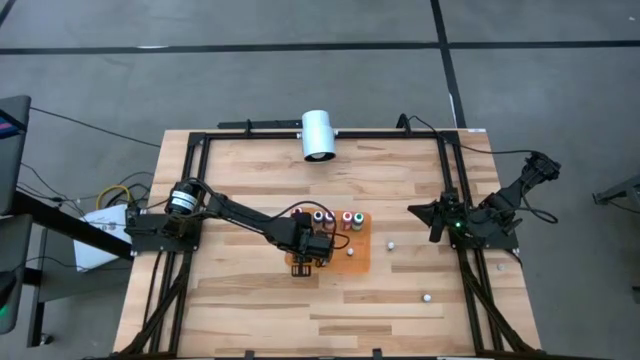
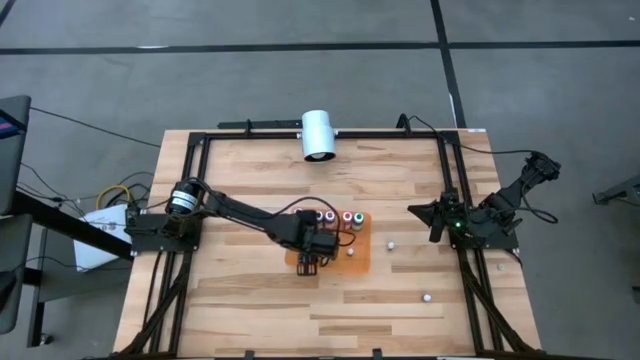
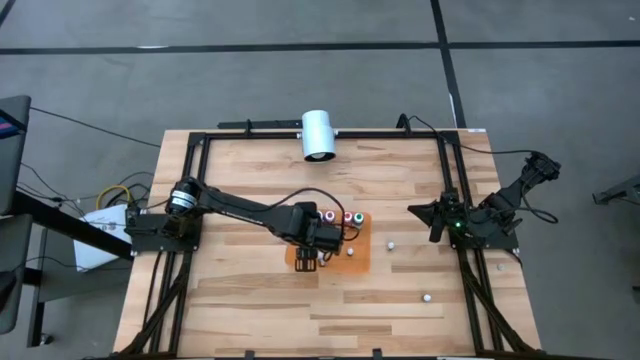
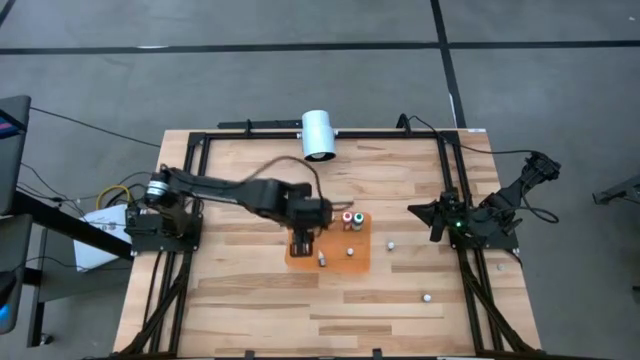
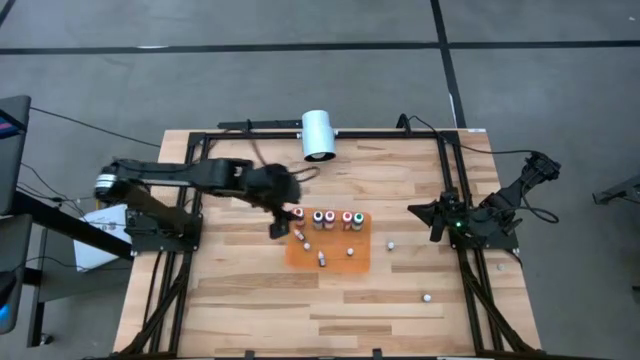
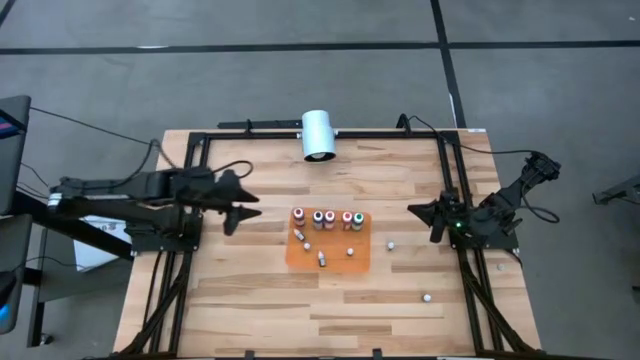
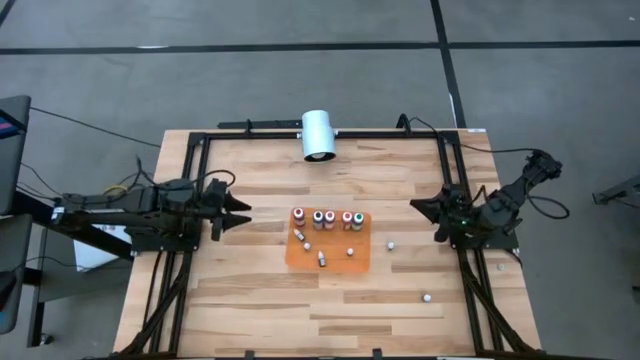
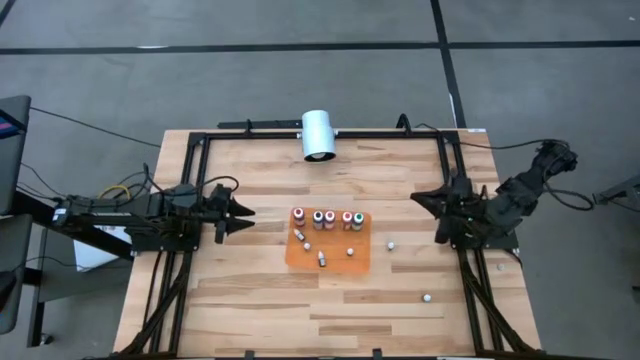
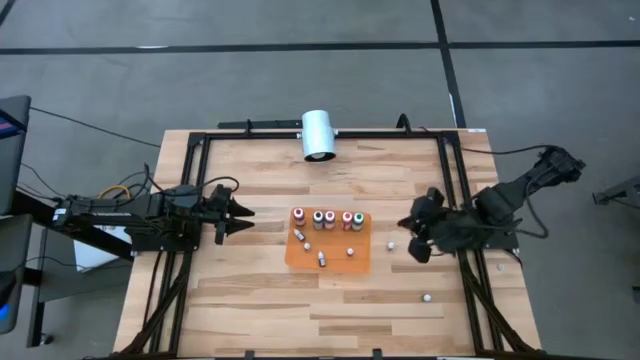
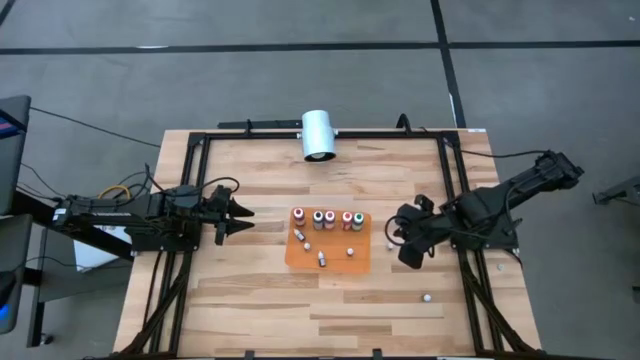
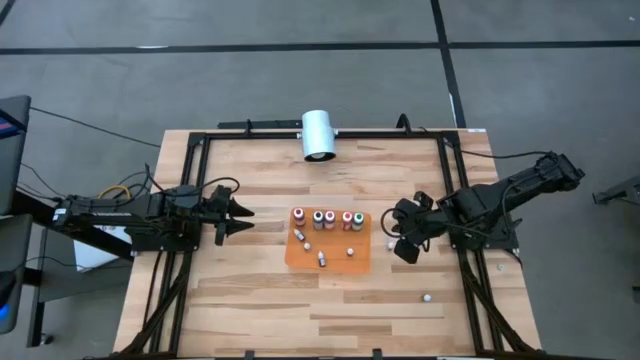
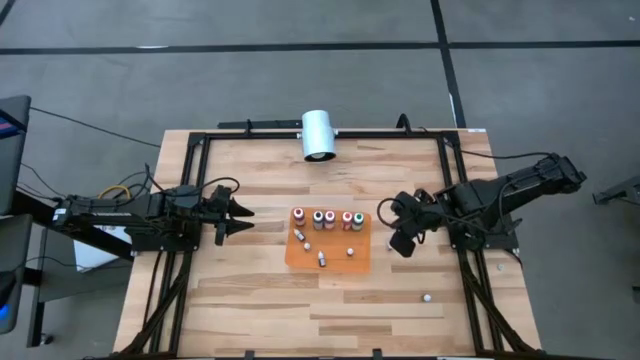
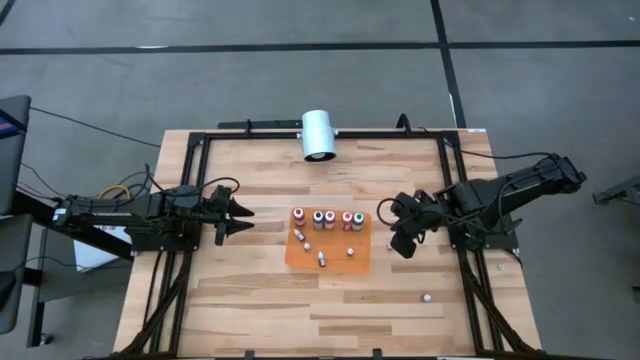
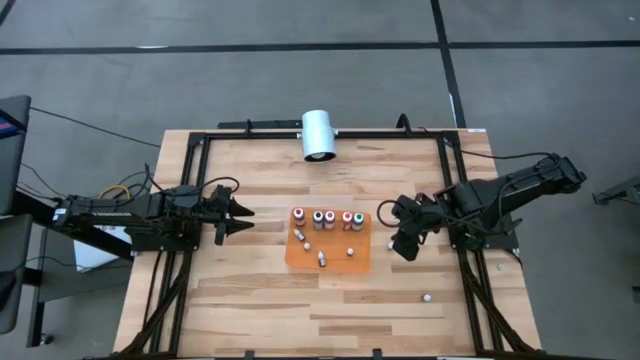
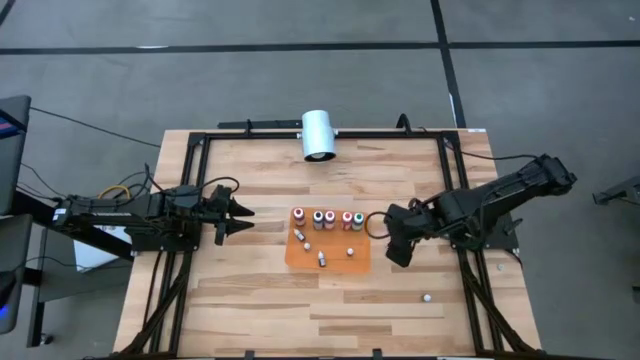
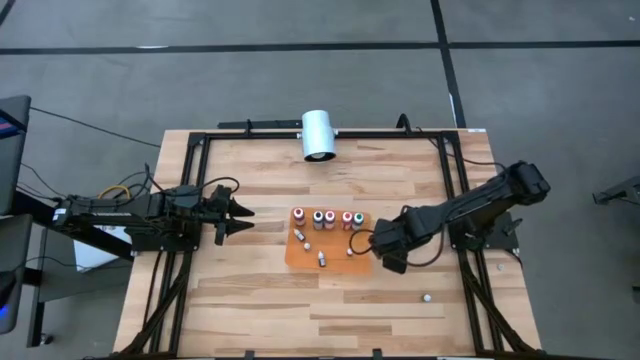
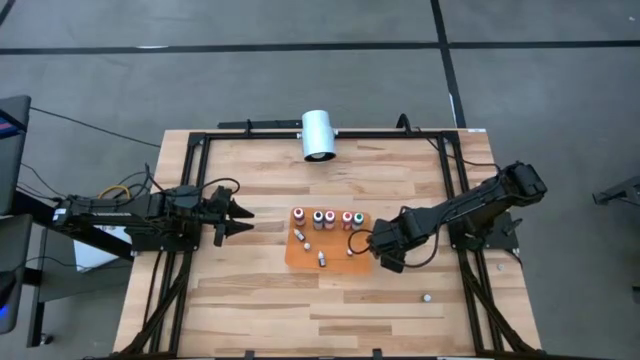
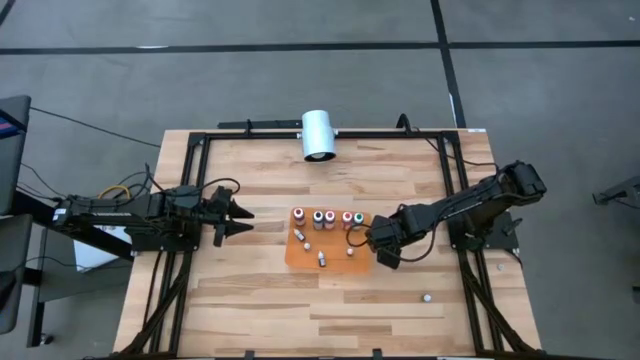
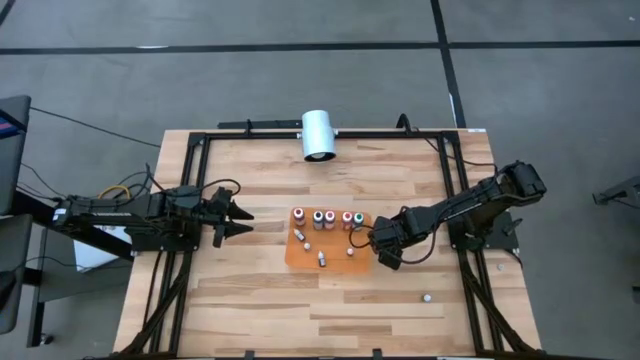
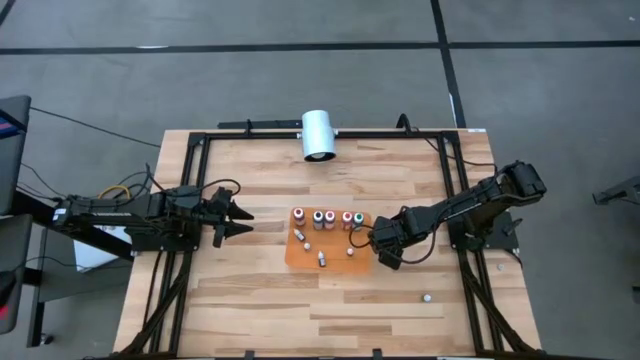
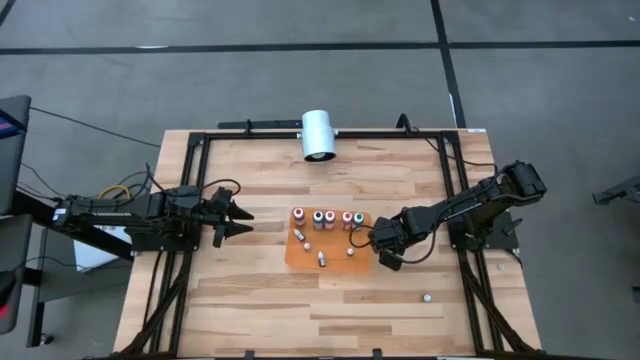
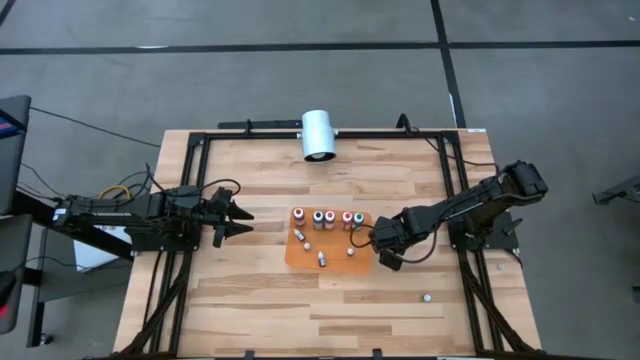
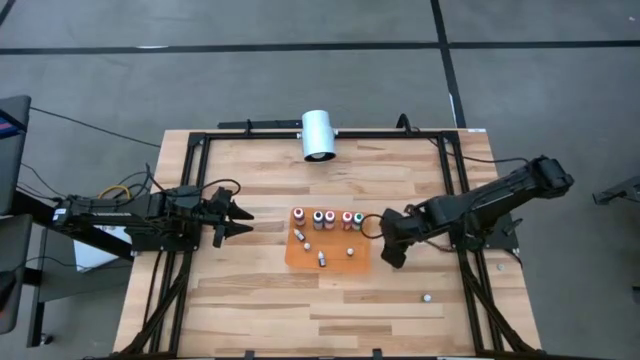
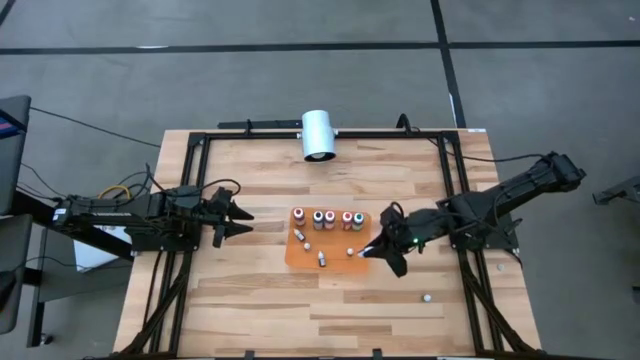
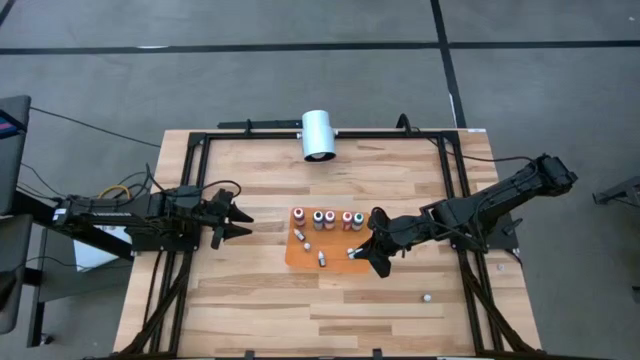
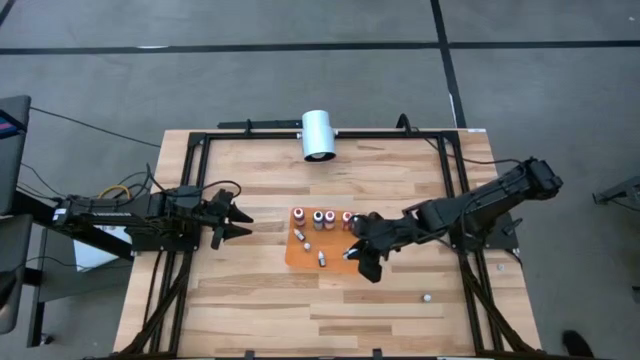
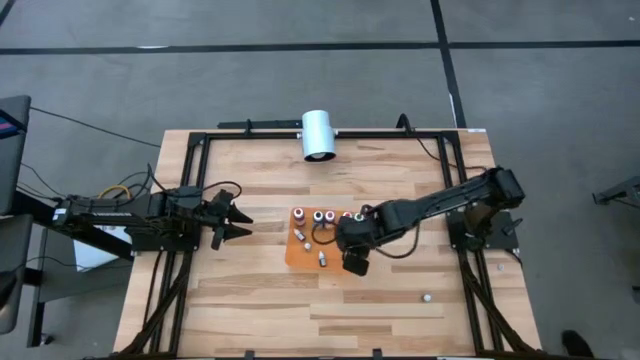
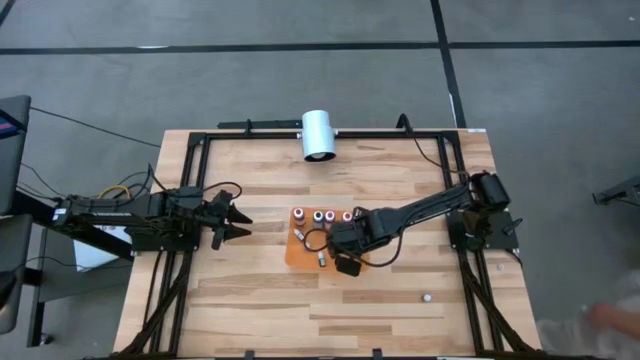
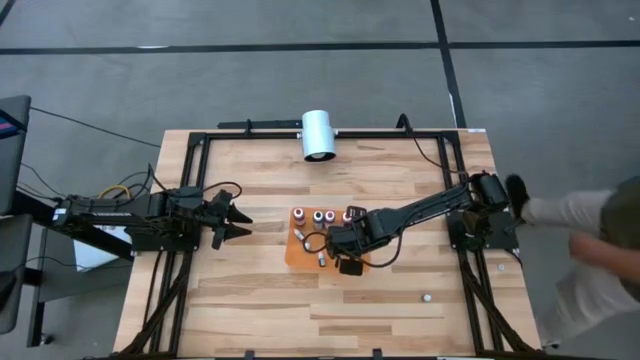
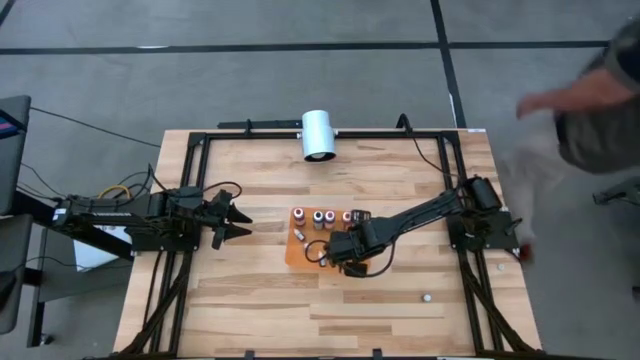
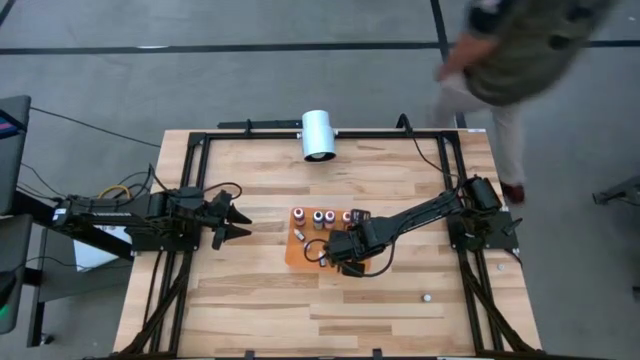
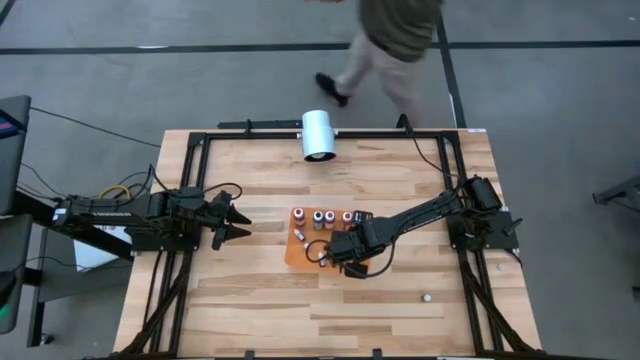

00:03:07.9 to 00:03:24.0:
Task: Pick & Place food coloring
Put the small brown food coloring into the orange bin

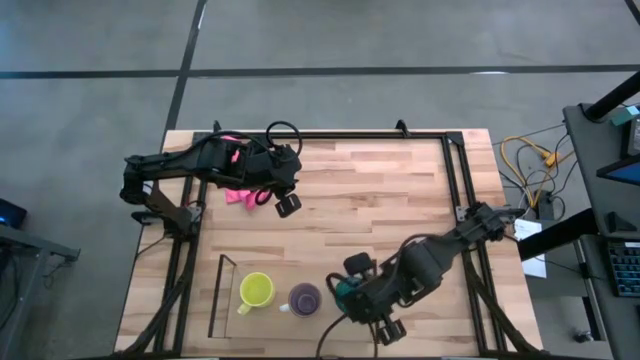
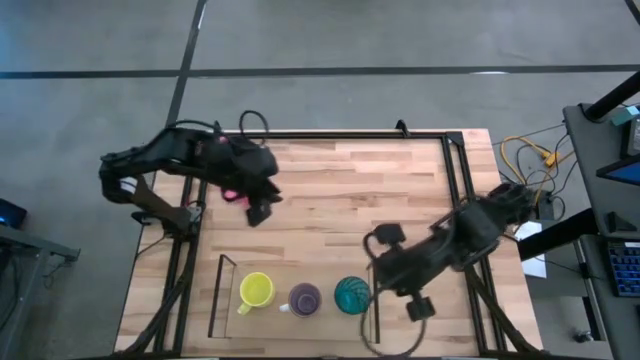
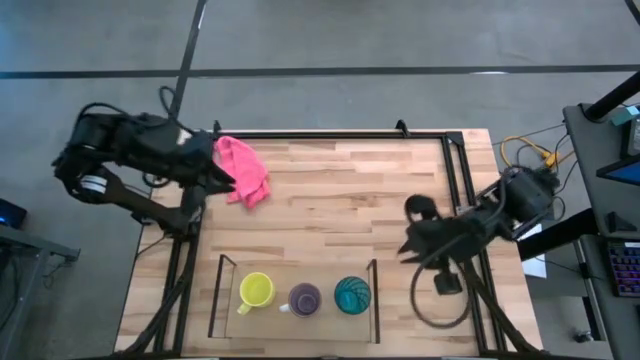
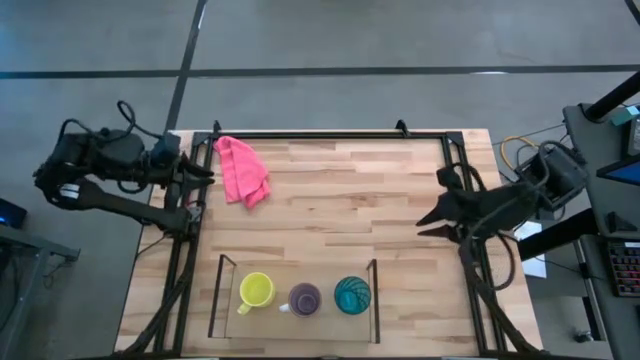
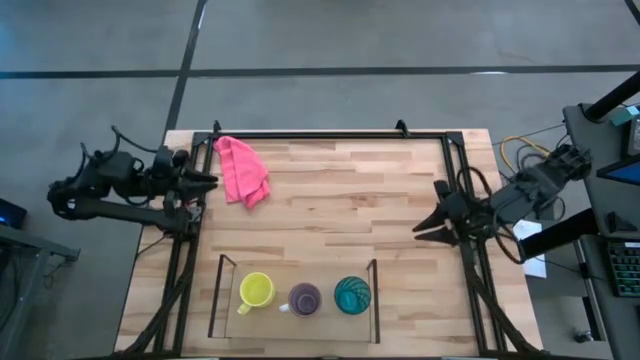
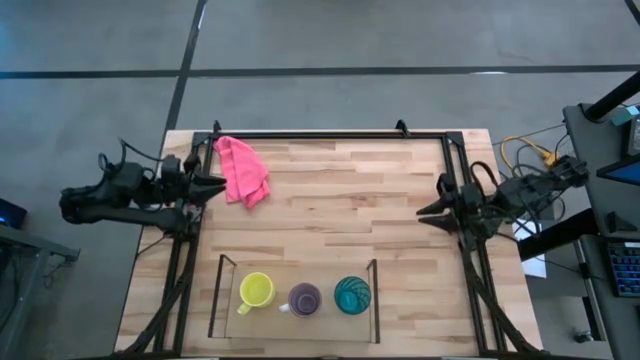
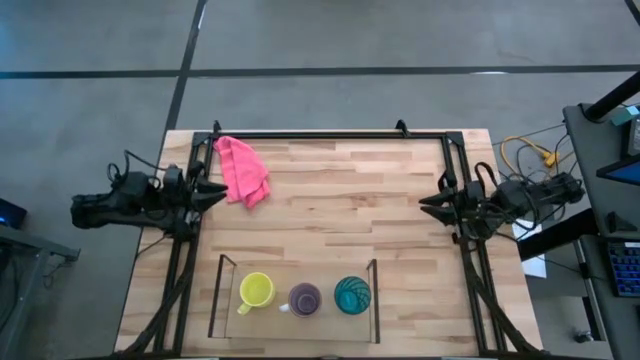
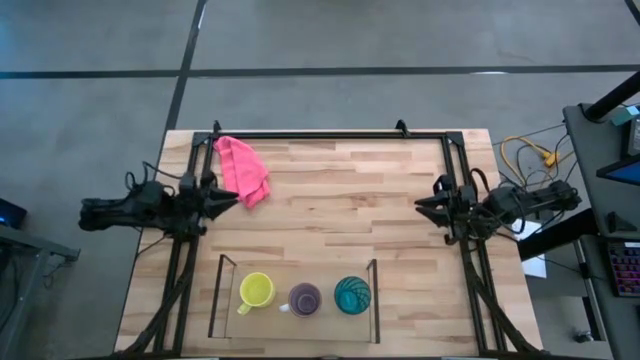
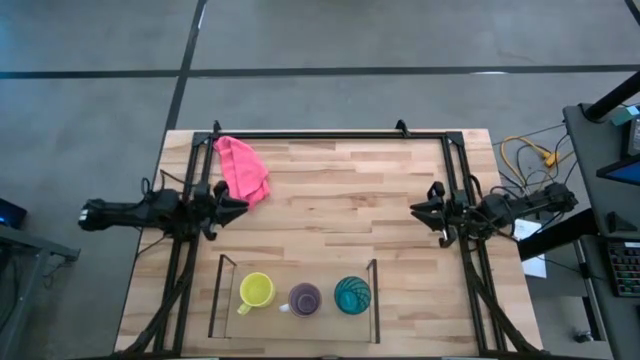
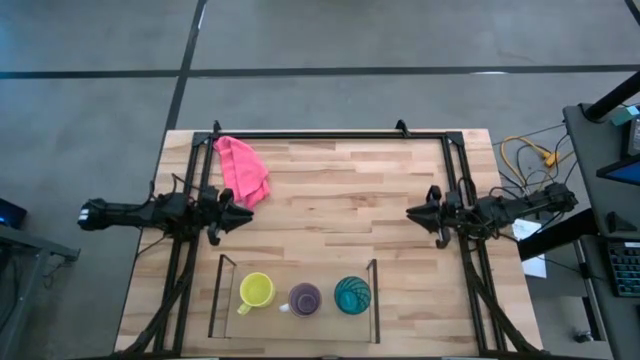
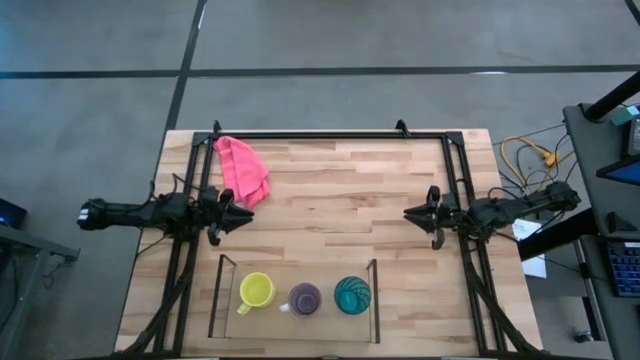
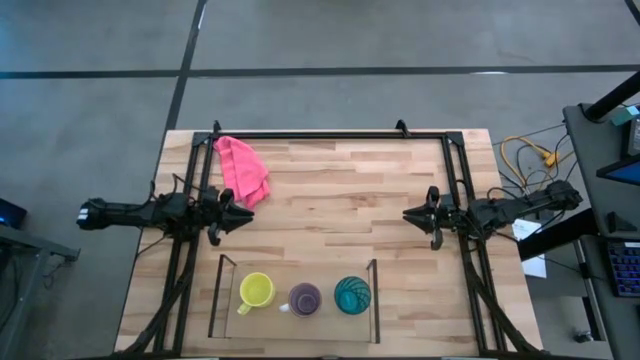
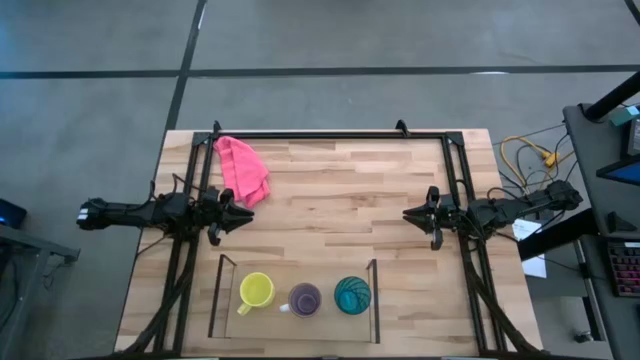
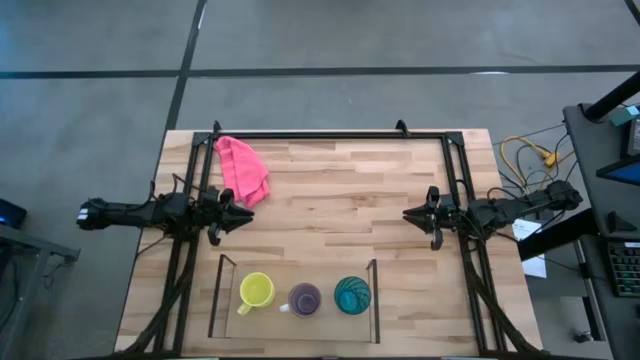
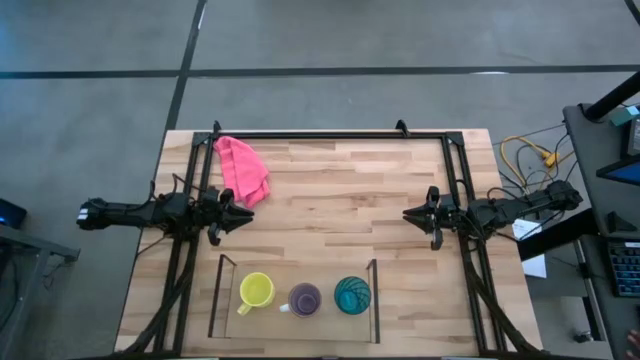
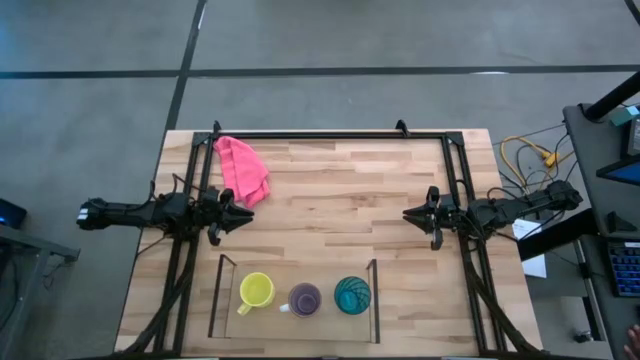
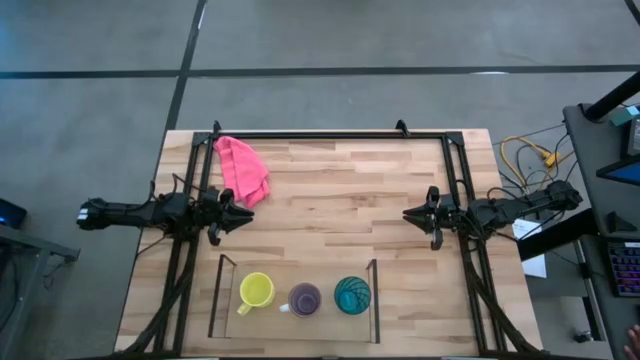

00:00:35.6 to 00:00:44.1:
Task: Stack small to large cups/mugs on shelf
Return to Home Position
